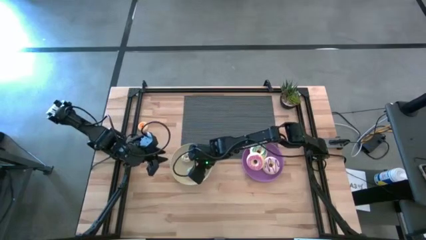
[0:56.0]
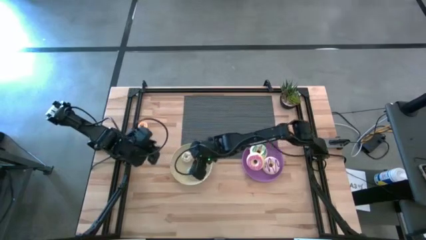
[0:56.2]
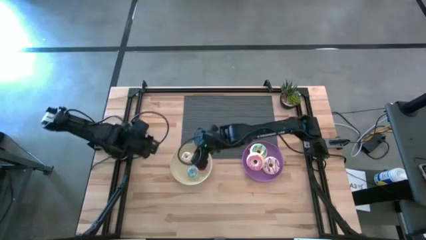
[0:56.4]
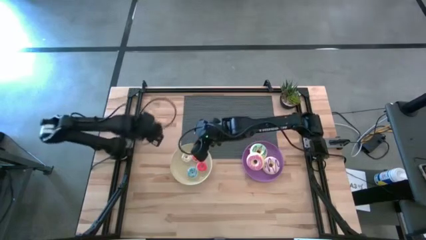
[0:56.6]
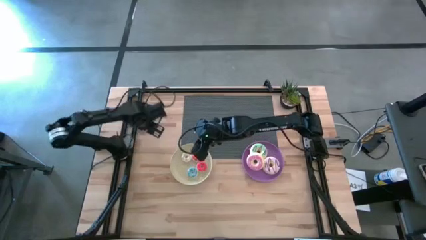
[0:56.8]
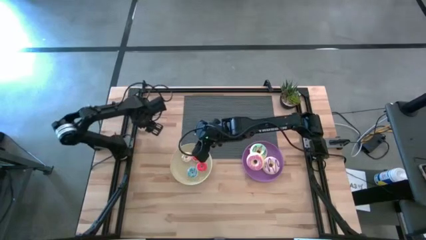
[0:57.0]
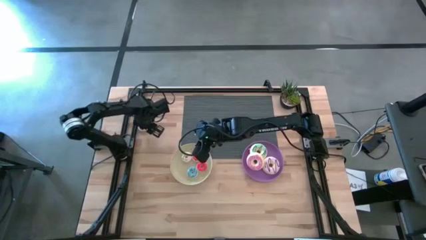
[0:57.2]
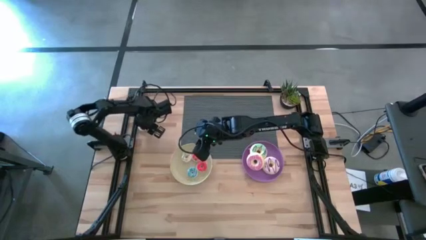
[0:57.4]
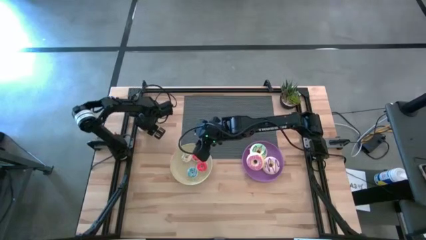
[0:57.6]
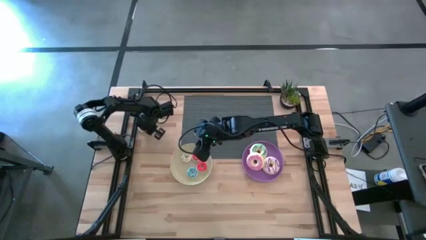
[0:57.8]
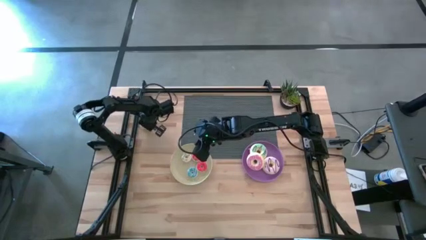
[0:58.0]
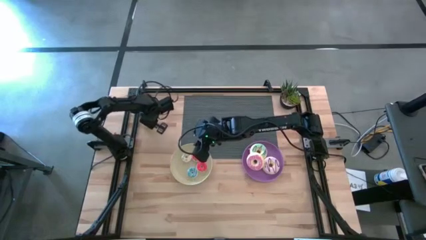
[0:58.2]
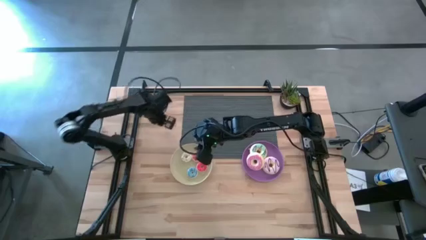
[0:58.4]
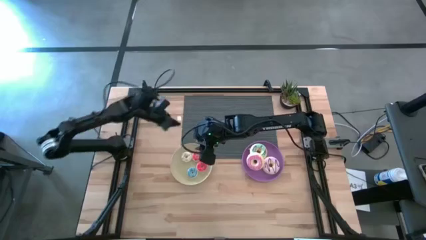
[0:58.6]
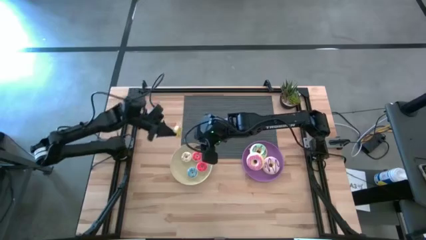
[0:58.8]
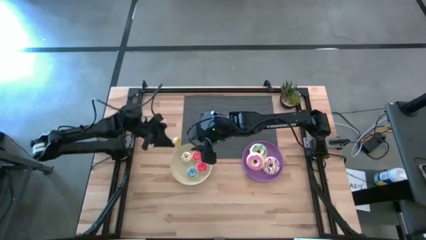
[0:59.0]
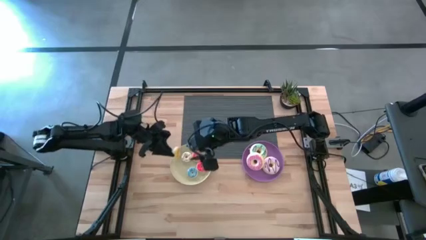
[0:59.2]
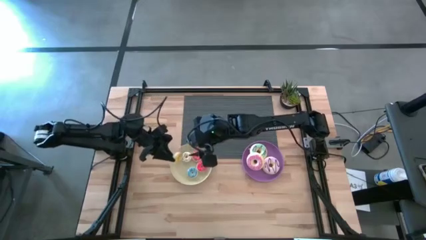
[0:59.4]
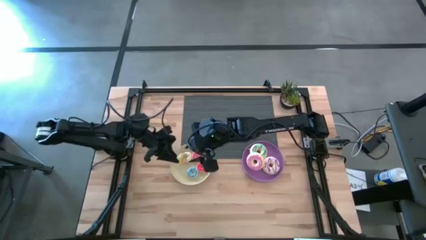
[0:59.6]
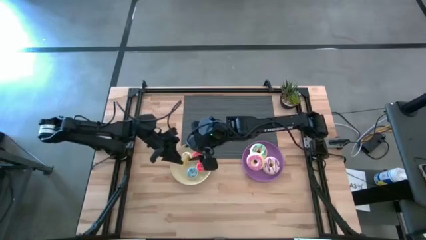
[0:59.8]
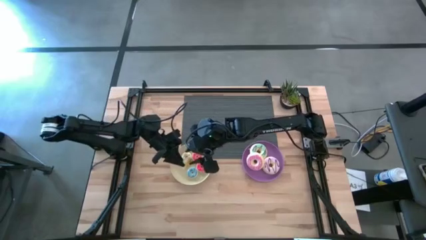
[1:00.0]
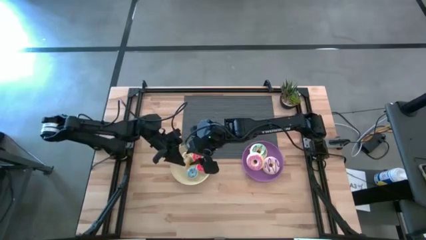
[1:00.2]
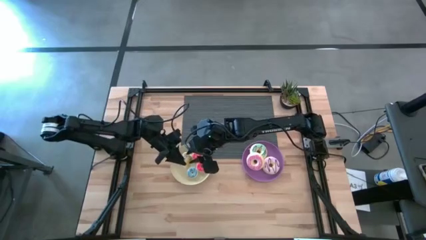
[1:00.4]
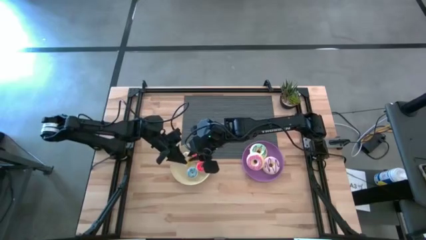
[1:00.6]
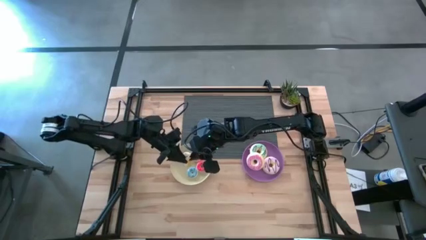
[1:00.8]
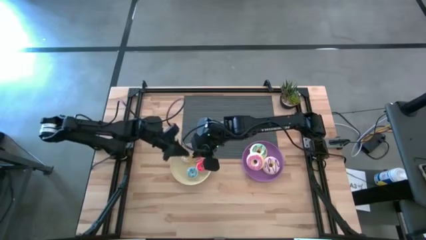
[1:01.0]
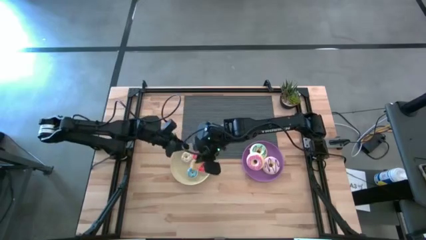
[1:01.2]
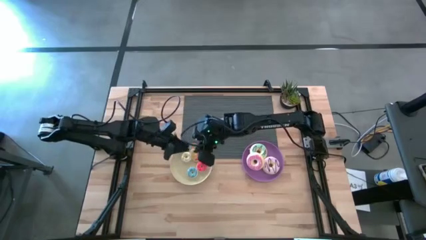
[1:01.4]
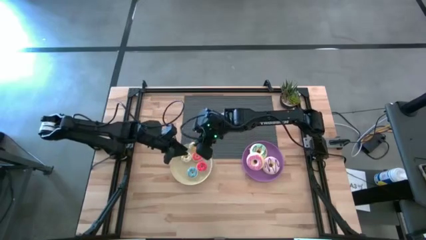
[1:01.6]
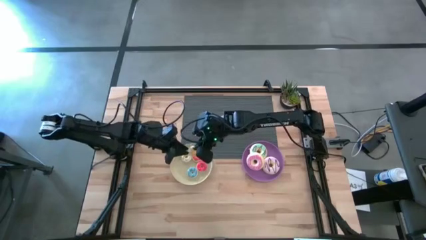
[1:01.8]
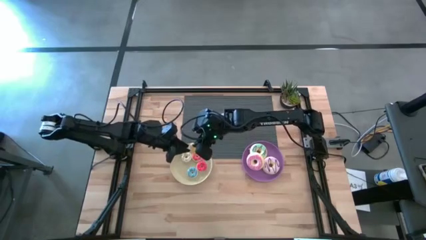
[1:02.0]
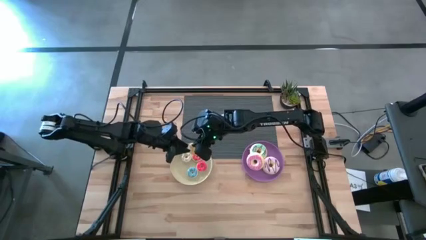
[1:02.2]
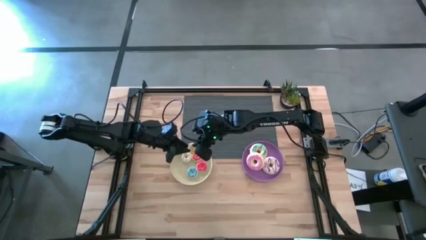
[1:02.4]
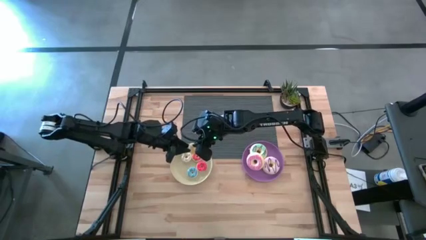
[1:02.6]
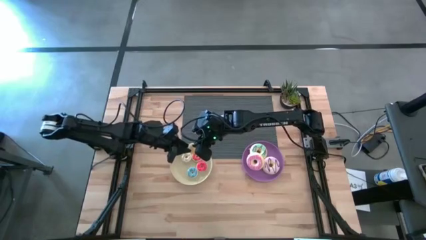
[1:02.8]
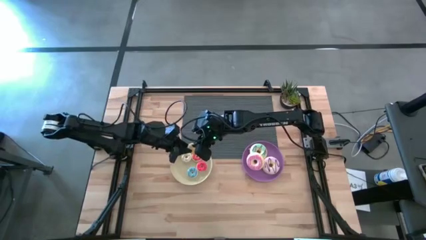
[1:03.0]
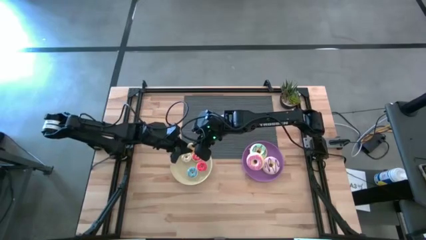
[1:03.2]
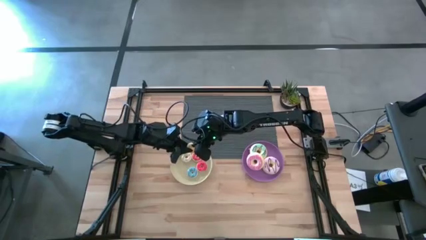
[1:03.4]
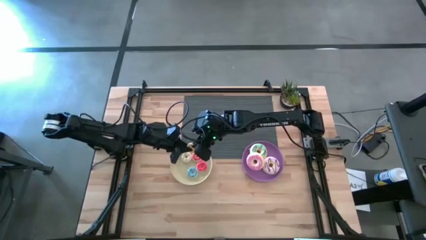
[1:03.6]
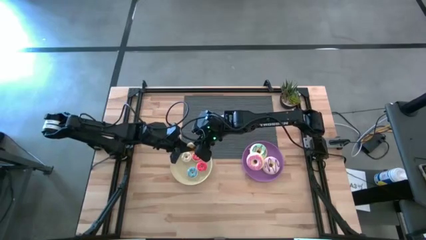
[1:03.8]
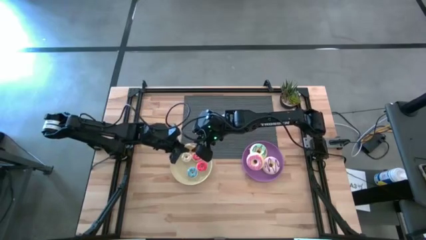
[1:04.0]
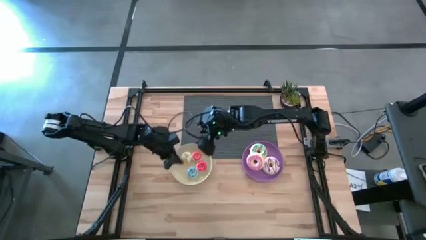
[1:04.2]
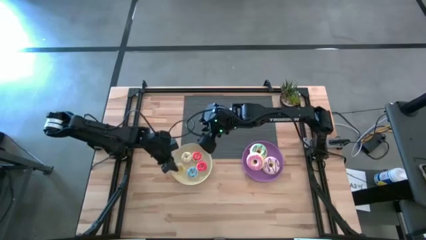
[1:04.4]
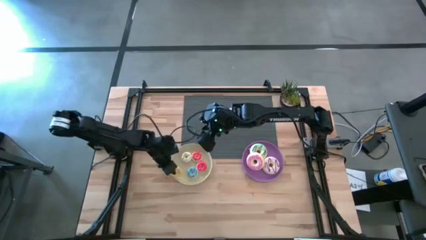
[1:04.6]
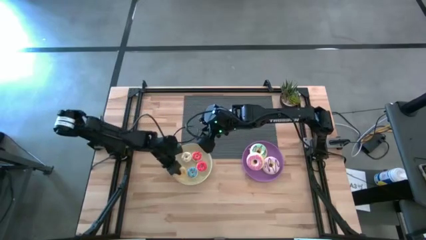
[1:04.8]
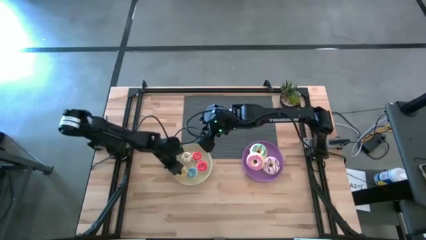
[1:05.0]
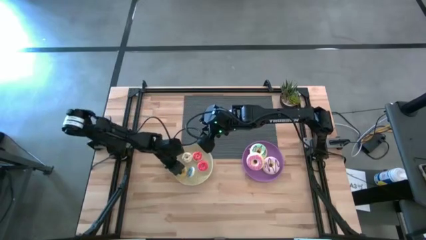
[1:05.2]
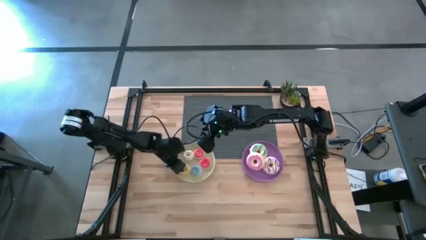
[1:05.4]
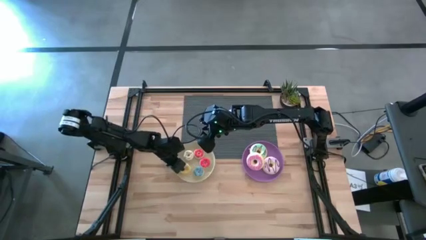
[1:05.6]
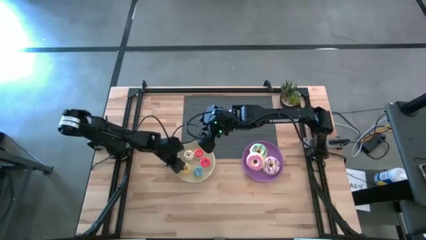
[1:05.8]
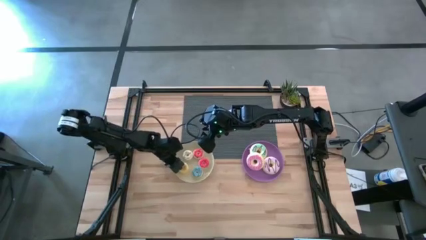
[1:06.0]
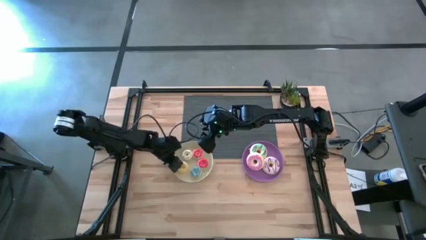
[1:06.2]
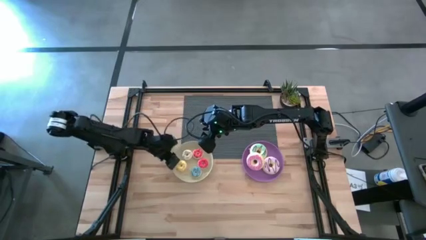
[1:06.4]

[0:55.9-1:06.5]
Task: Pick & Place donuts
Put the small yellow donut on the white plate

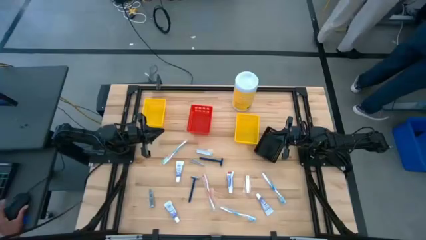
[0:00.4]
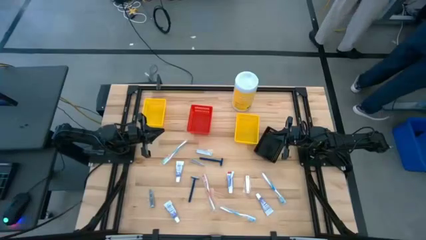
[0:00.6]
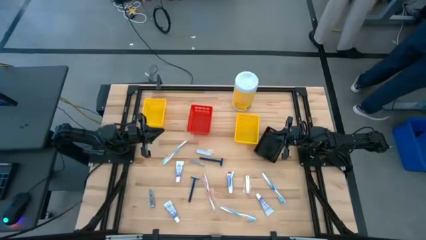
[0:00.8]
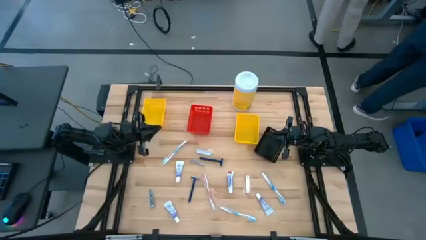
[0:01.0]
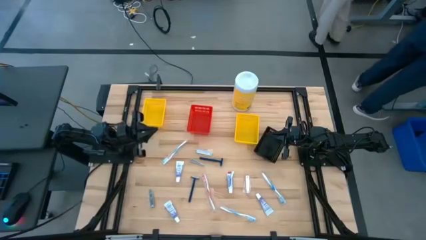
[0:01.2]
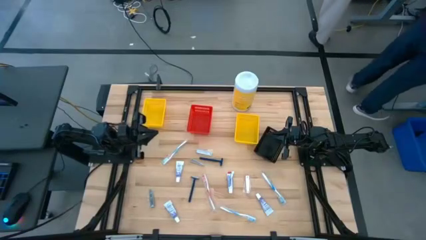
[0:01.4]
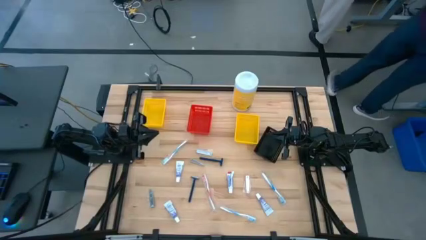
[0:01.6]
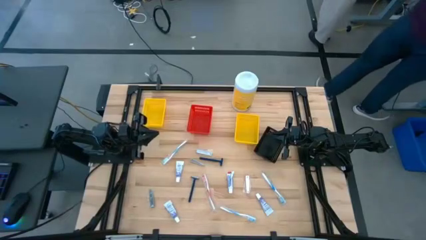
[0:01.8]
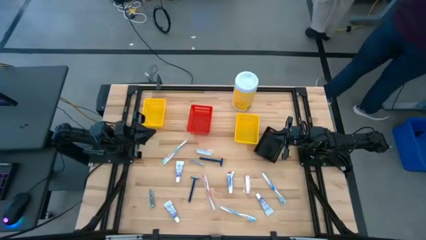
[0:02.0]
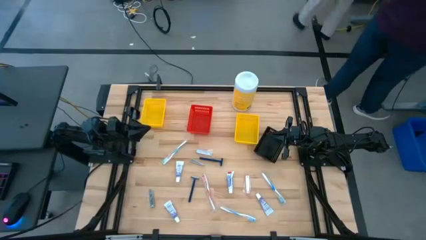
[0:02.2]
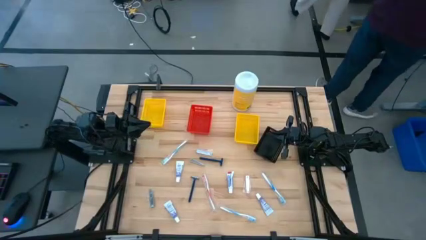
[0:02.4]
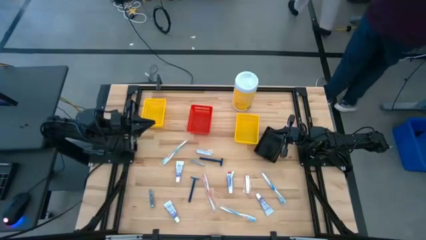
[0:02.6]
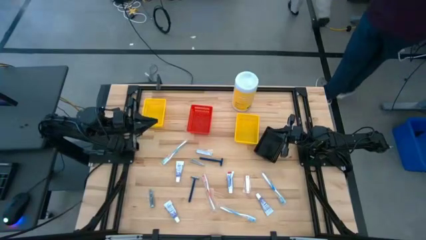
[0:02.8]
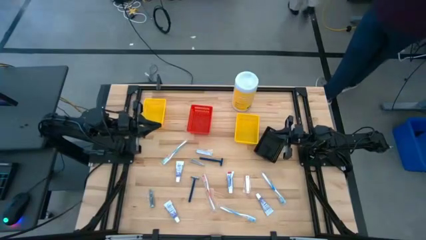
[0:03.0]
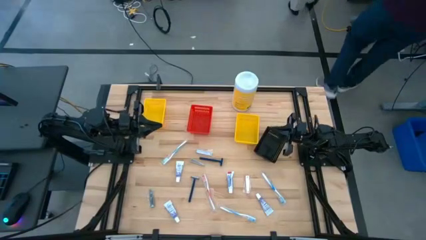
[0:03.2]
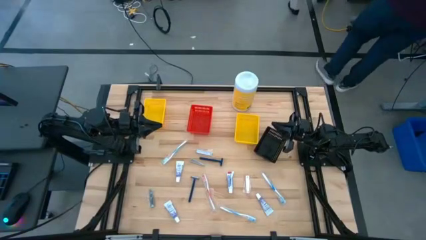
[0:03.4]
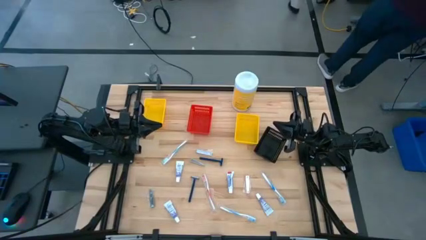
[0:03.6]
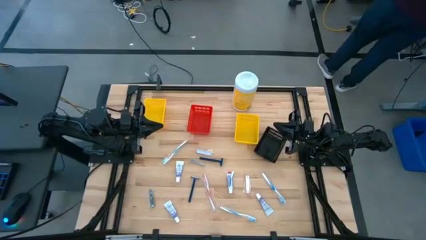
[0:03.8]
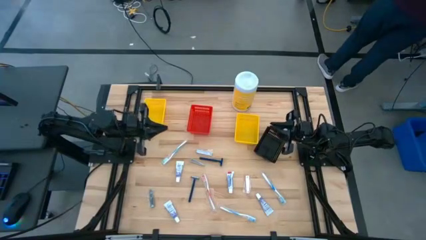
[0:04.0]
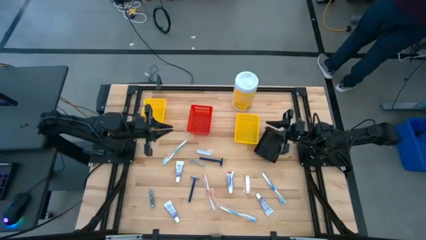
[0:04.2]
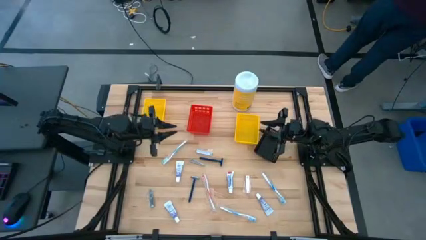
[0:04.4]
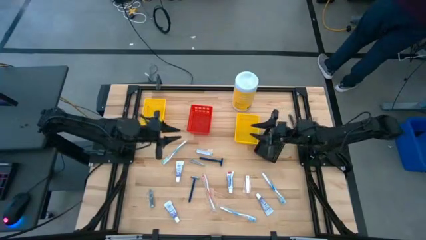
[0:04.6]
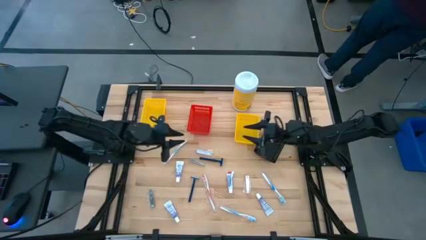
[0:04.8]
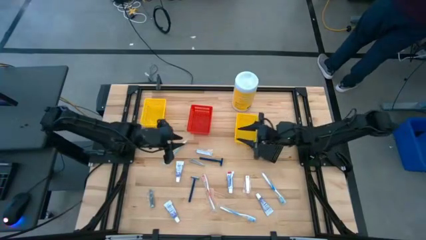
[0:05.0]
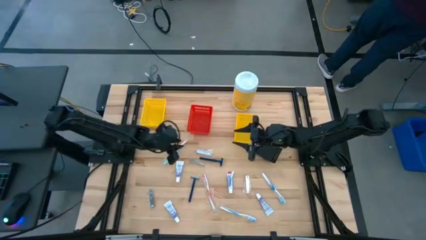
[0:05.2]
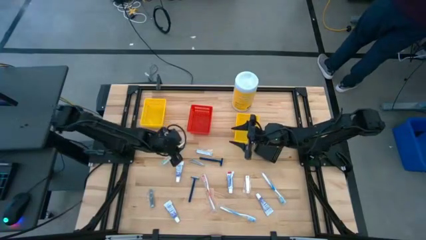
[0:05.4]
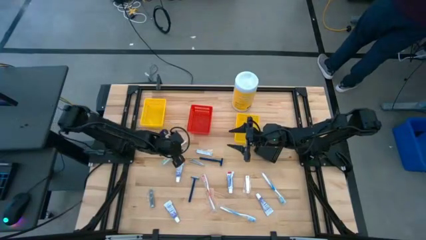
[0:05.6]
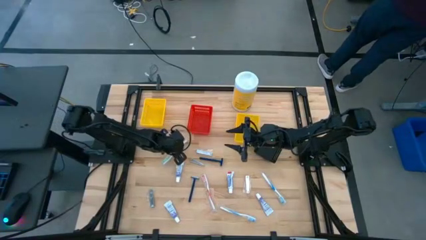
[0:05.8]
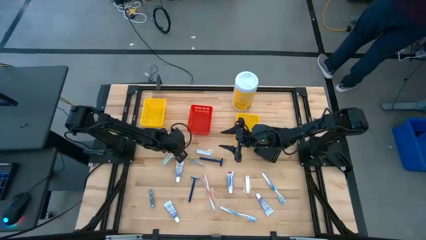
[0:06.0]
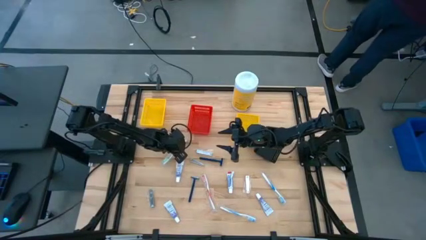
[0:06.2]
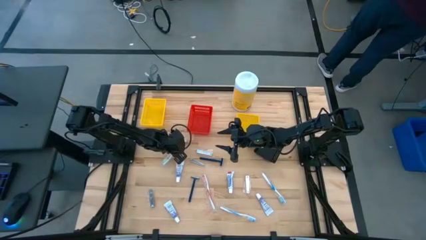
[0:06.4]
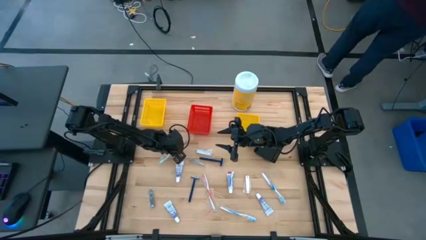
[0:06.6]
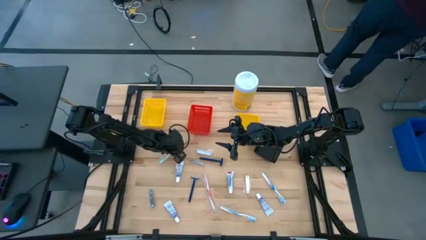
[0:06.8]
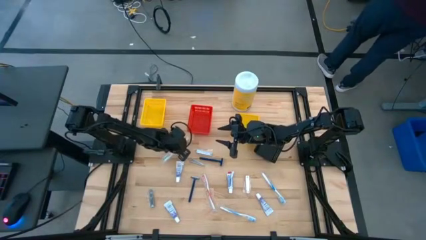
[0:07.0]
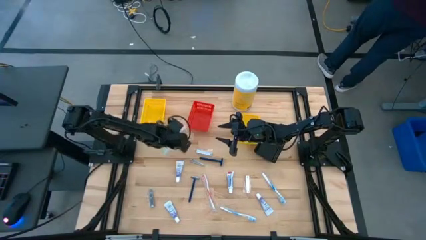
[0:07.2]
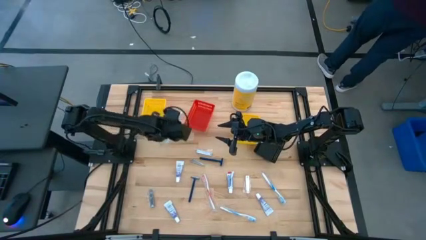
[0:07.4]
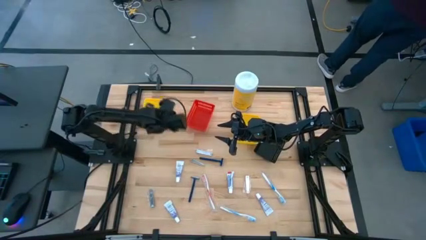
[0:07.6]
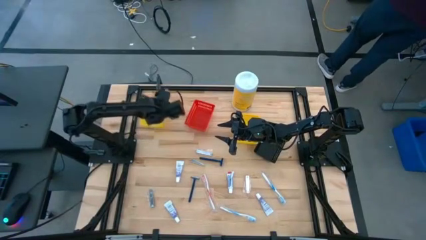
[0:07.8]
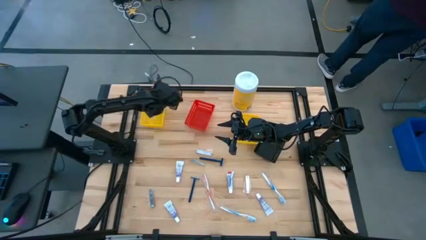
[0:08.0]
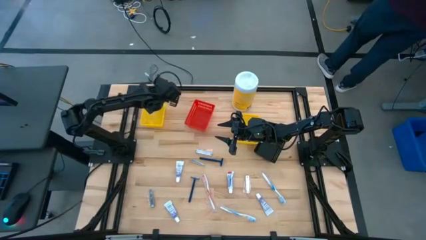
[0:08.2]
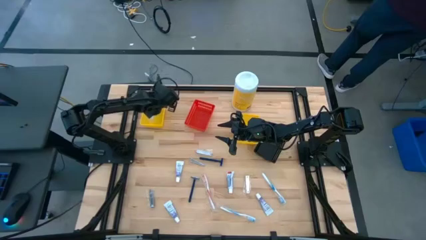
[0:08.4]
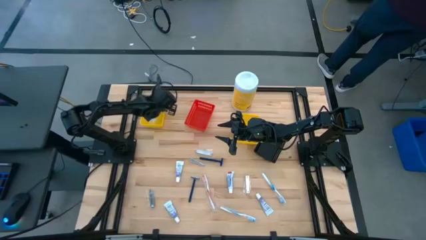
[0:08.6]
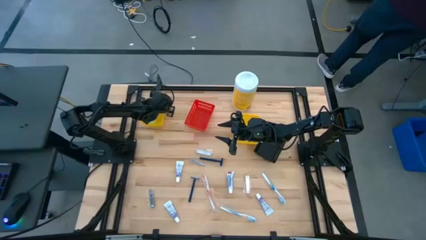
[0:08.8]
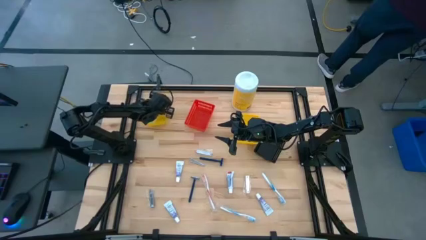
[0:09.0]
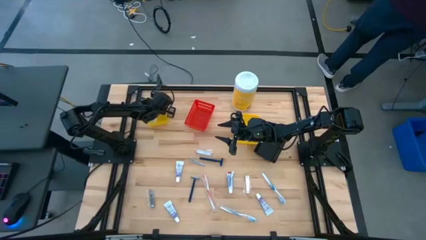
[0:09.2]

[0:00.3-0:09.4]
Task: Pick & Place Travel size toiletries
Put the green toothbrush into the left yellow basket
